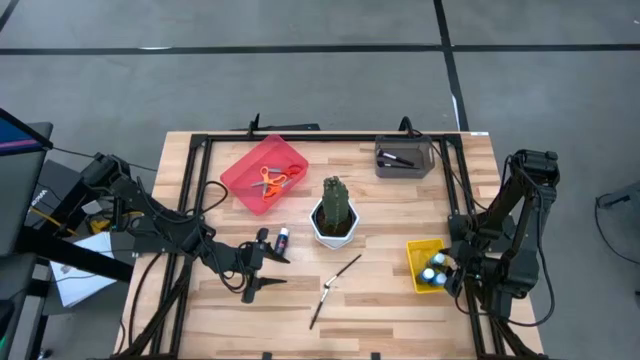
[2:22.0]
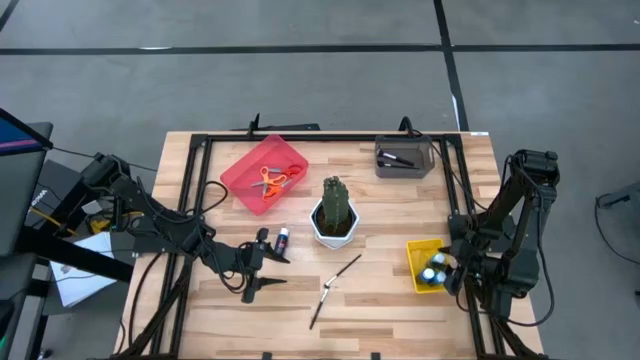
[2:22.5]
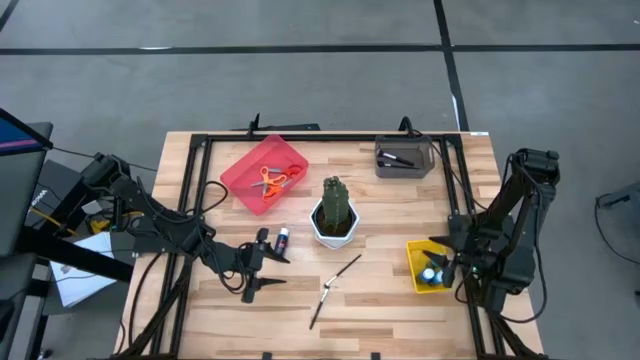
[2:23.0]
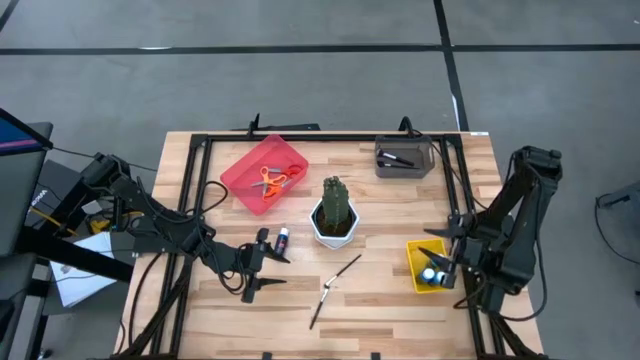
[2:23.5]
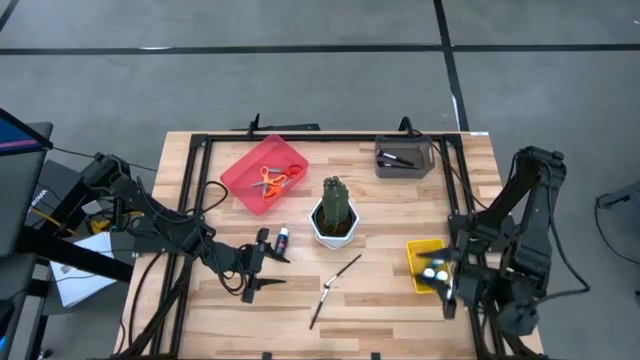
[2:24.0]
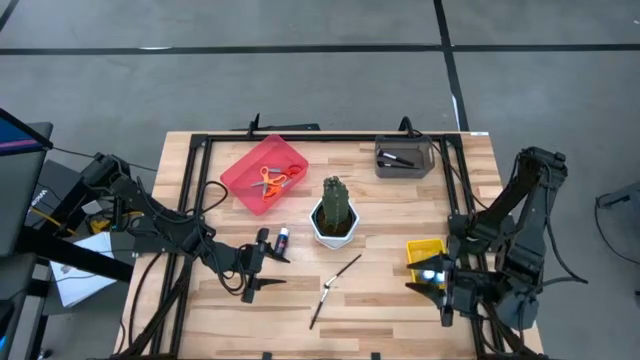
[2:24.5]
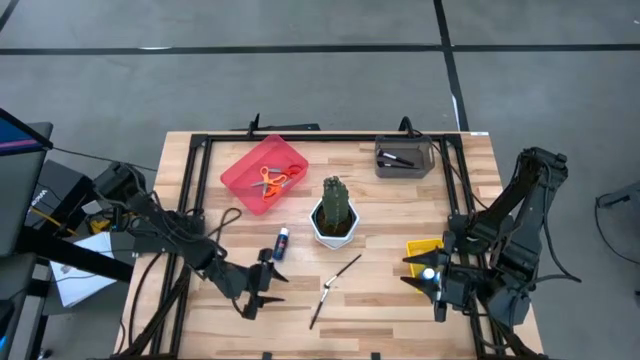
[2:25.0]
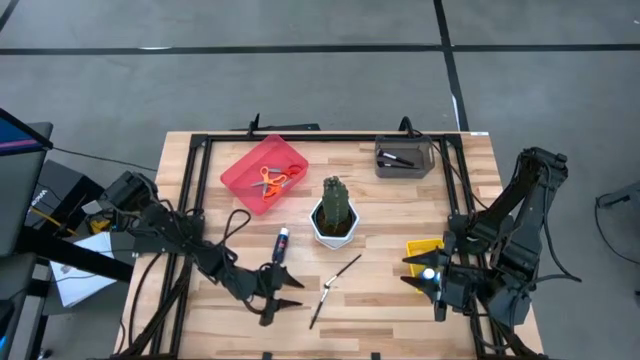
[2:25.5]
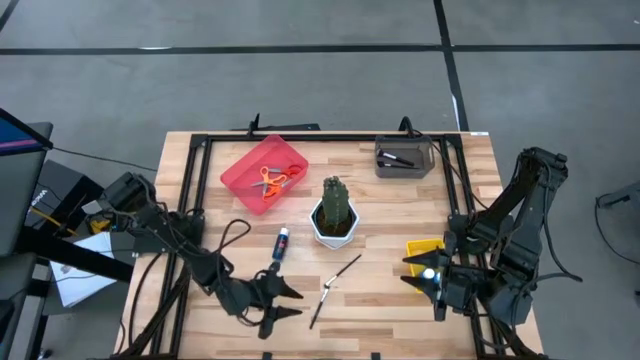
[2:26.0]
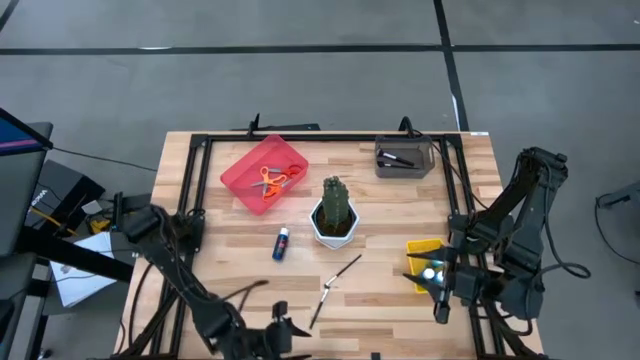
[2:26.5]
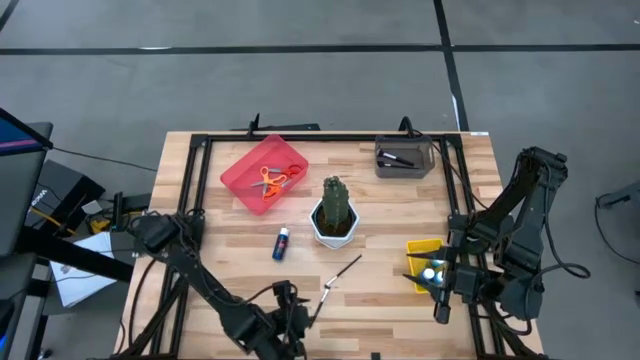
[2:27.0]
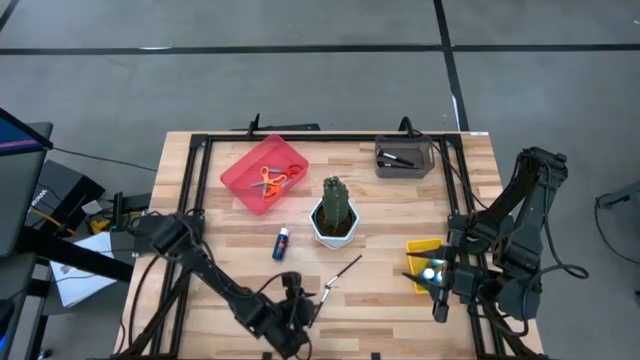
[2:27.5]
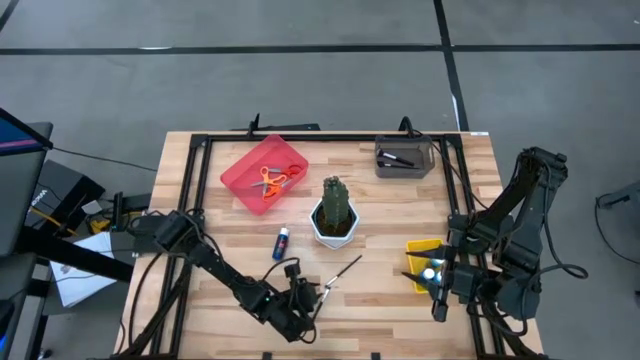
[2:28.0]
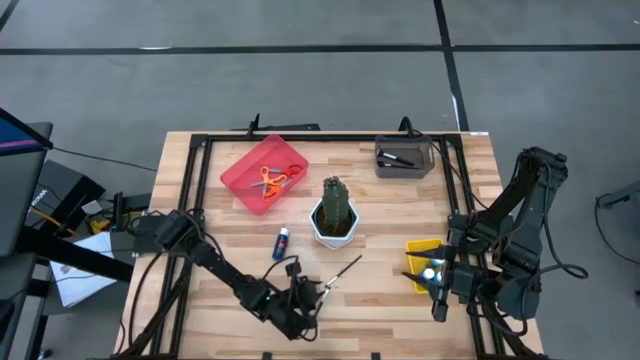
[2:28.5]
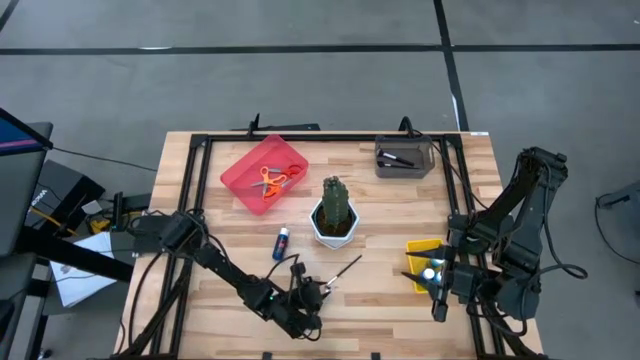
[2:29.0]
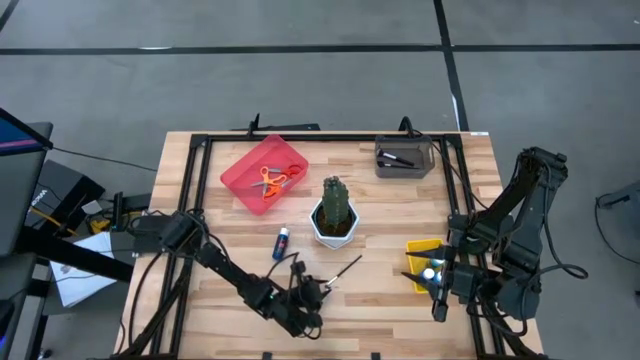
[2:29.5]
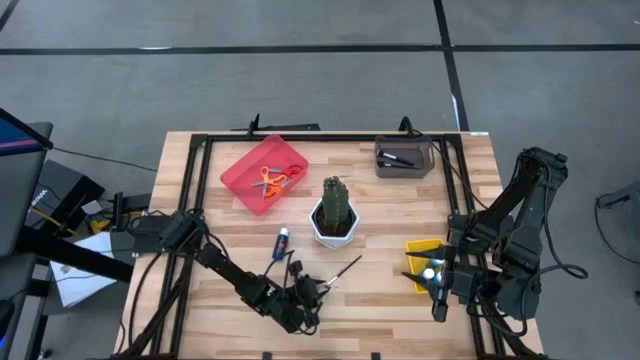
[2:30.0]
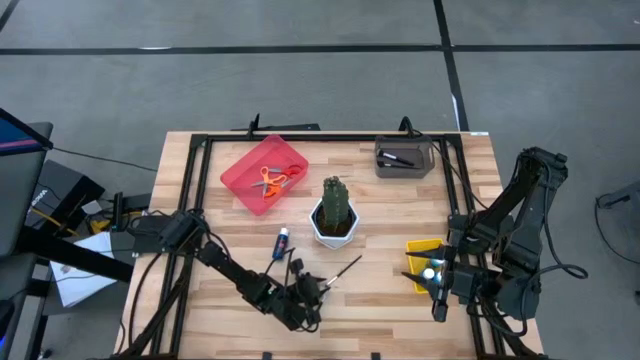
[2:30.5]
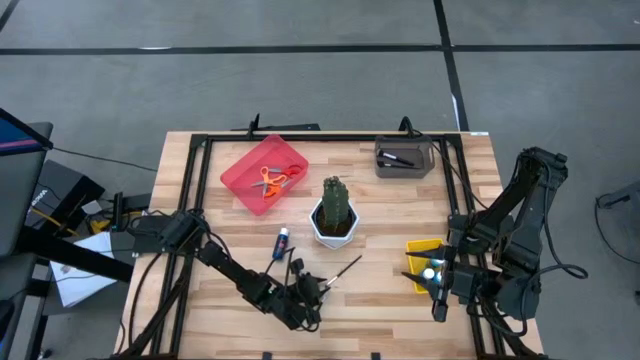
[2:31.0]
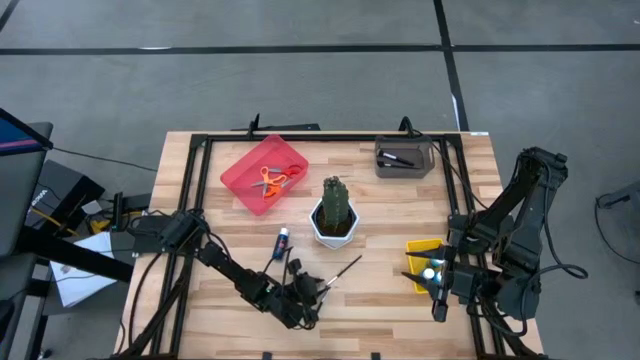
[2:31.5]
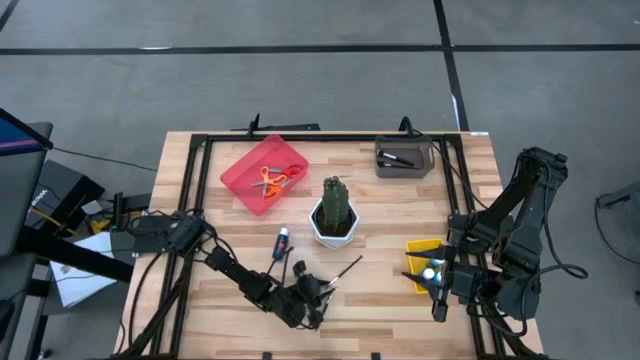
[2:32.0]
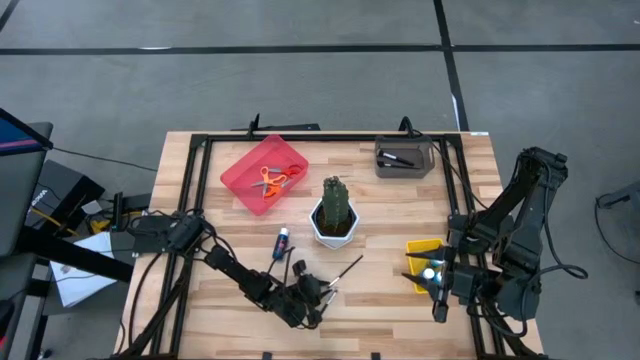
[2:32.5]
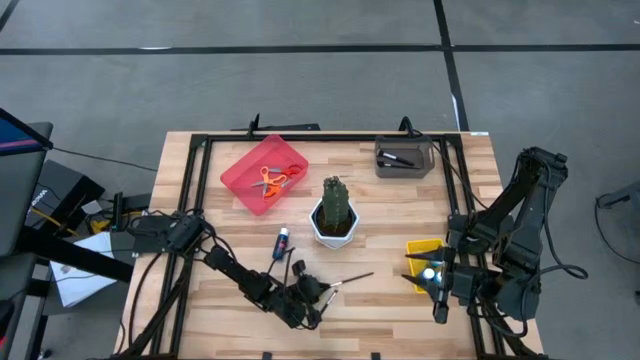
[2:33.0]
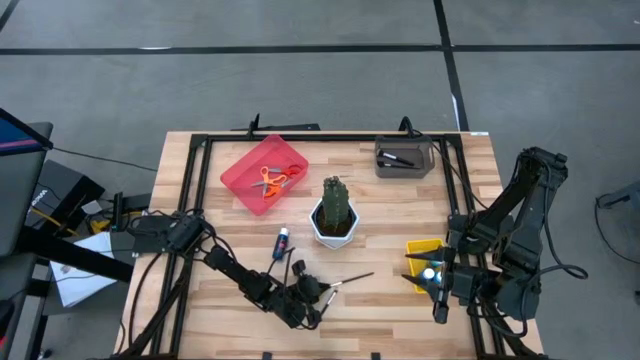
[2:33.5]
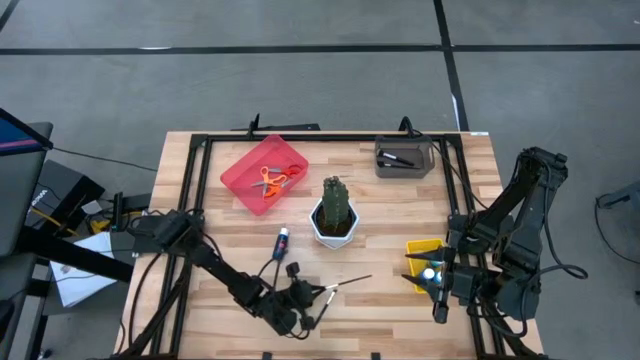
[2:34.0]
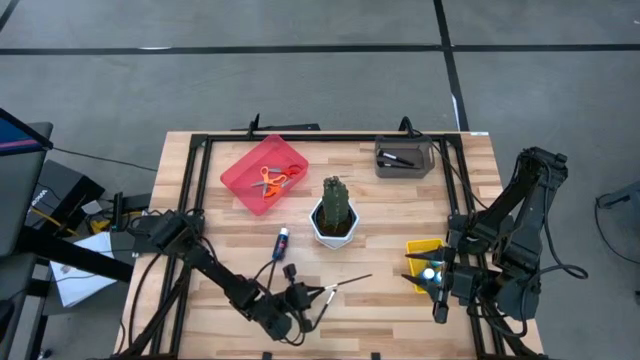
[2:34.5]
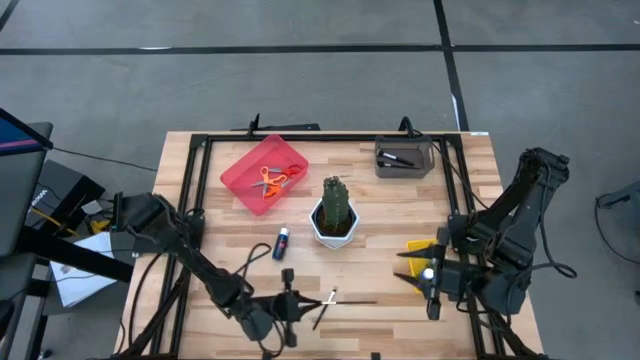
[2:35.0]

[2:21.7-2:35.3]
Task: Pick & Place Paint Supplies
Put the top foundation brush into the black bin

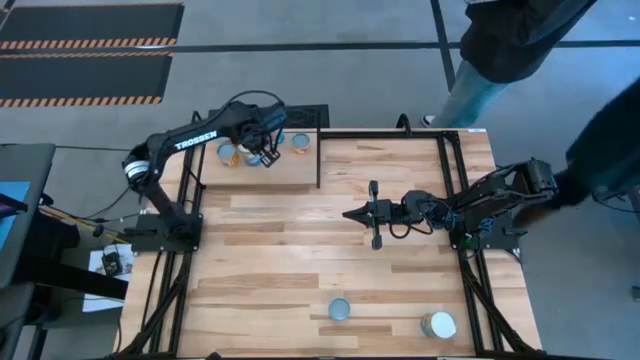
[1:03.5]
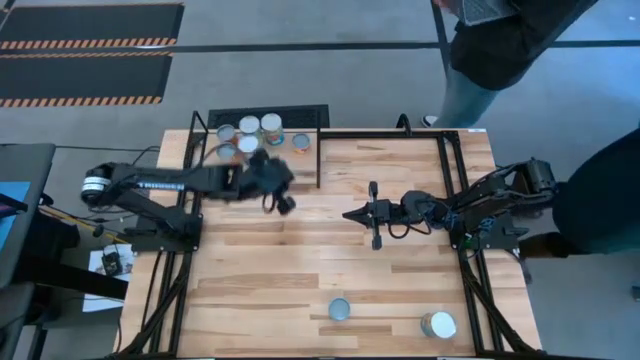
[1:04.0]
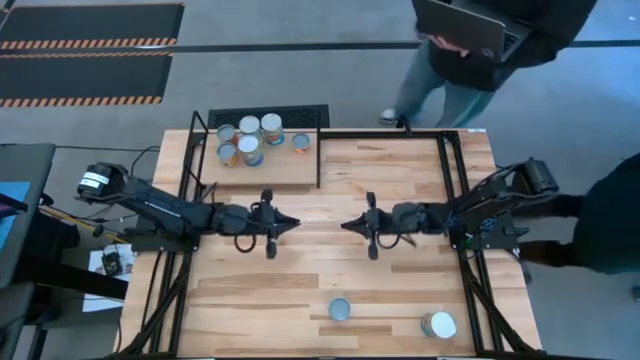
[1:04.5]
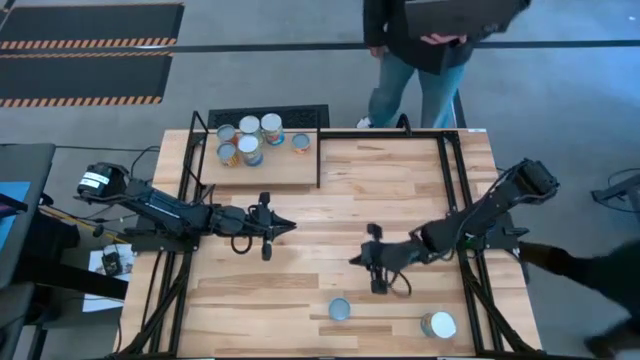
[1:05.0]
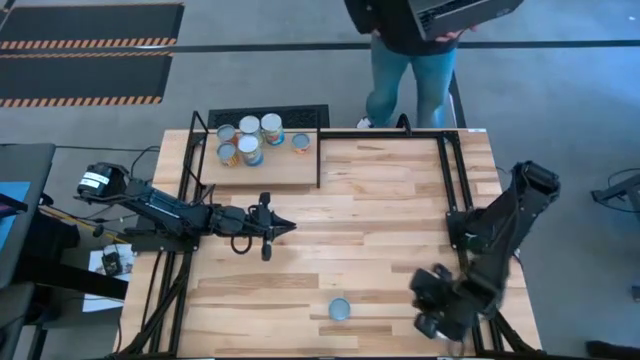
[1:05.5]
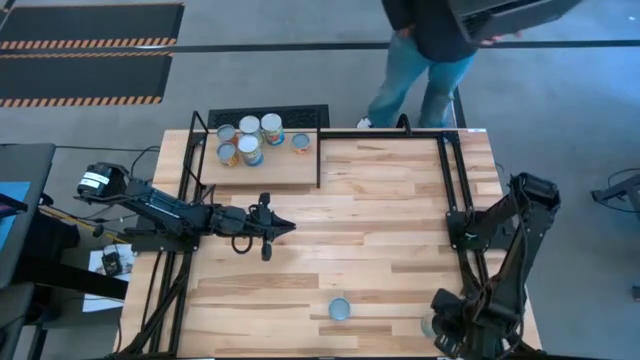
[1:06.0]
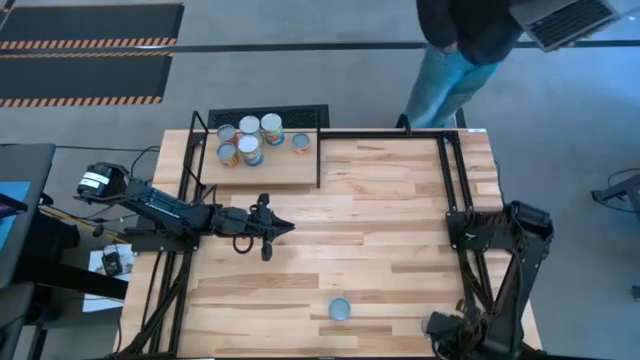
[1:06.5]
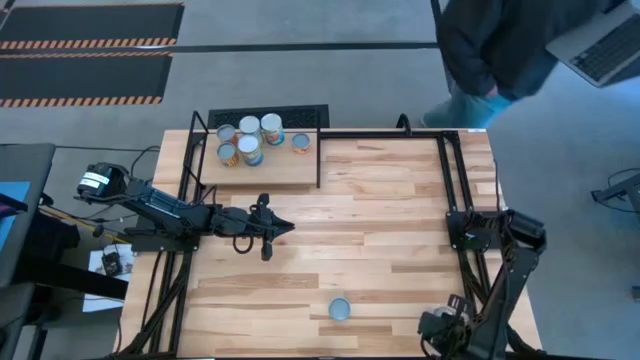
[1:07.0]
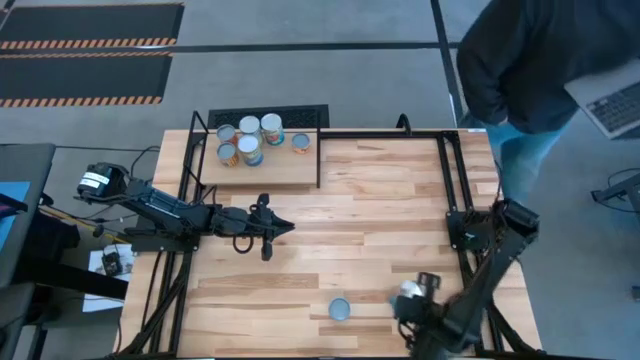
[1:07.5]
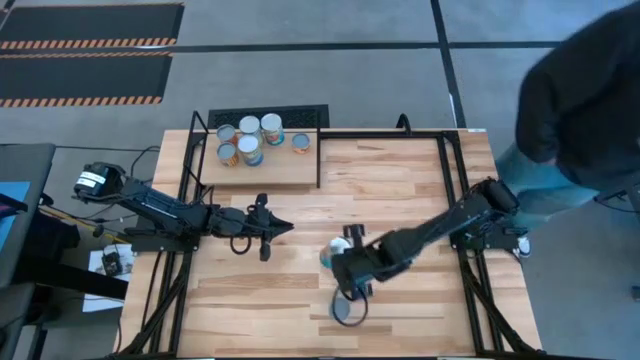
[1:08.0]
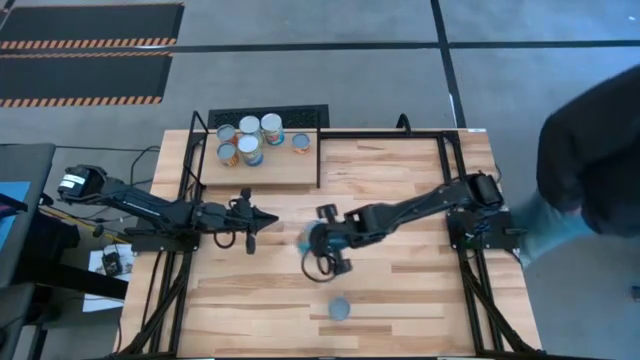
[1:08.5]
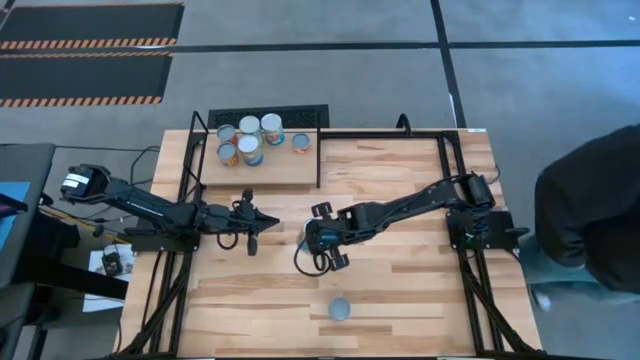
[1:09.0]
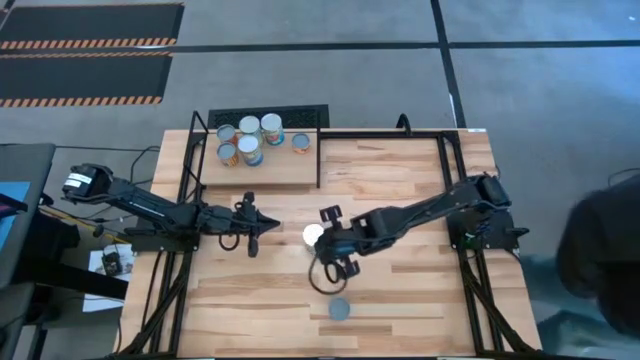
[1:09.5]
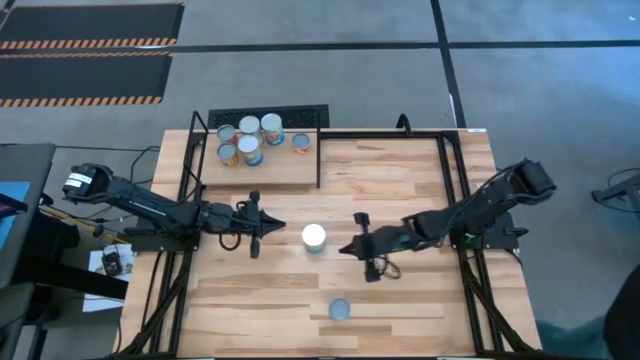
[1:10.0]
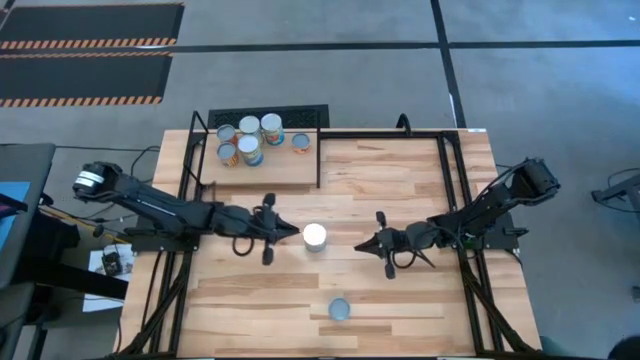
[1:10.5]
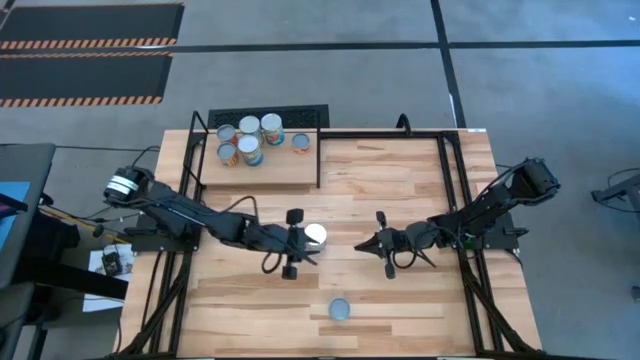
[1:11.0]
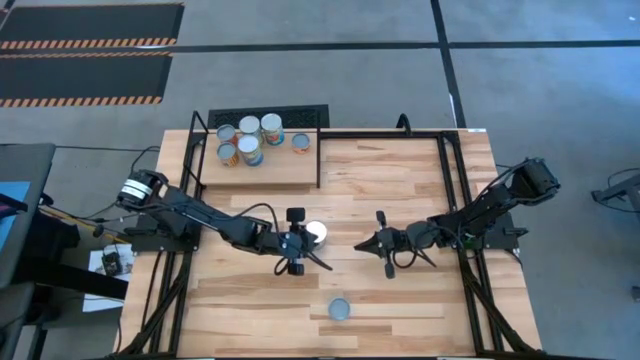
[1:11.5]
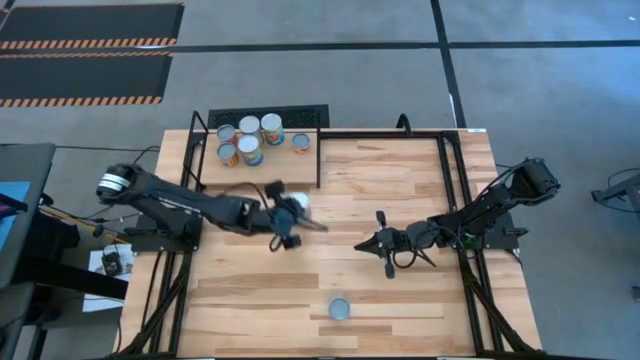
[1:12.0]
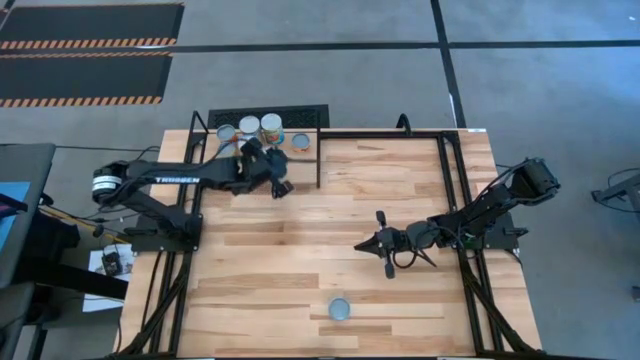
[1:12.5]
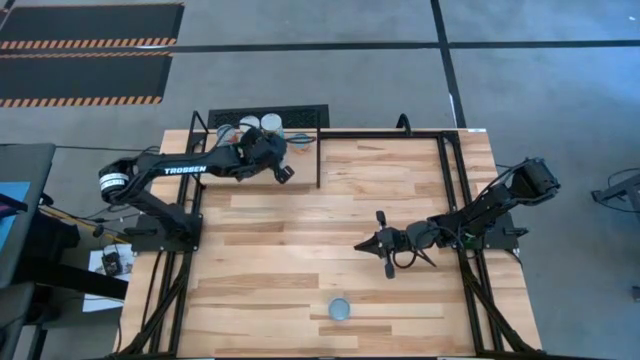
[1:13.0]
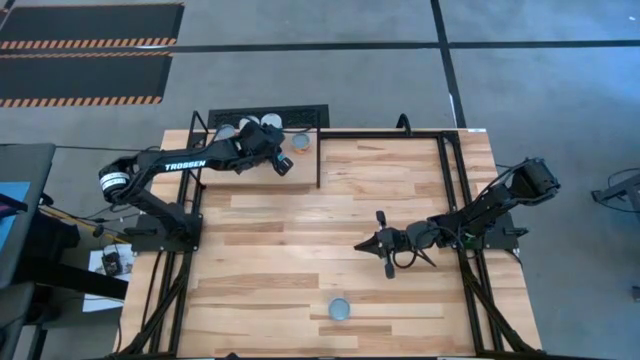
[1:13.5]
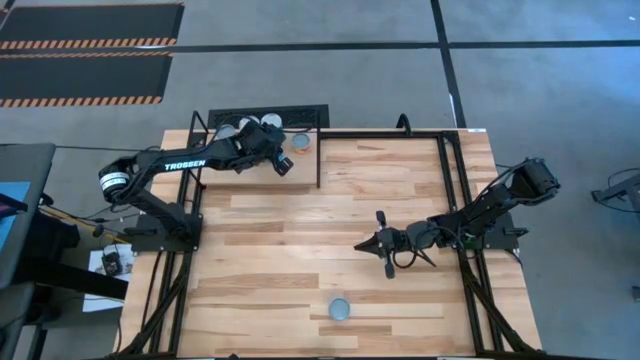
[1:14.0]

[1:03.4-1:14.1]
Task: Pick and place cans onto a shelf
Put the large canned tomatoes on the shelf aligned with the other large canned tomatoes
